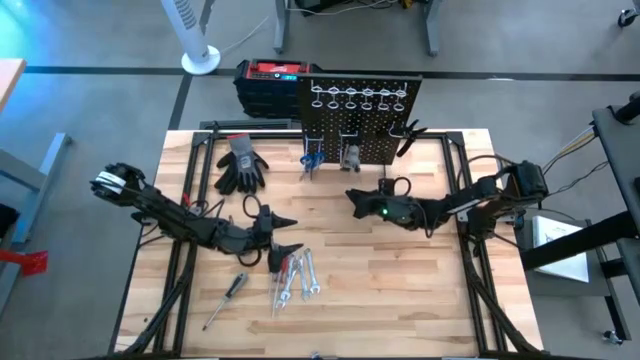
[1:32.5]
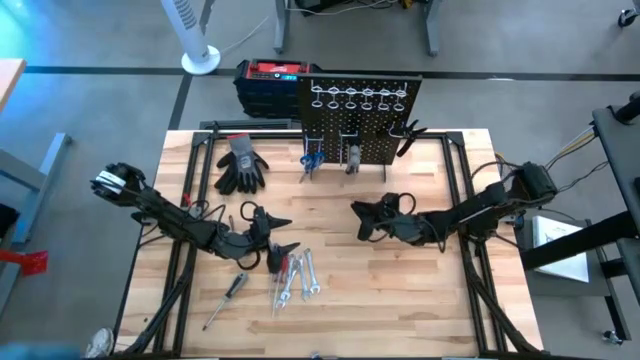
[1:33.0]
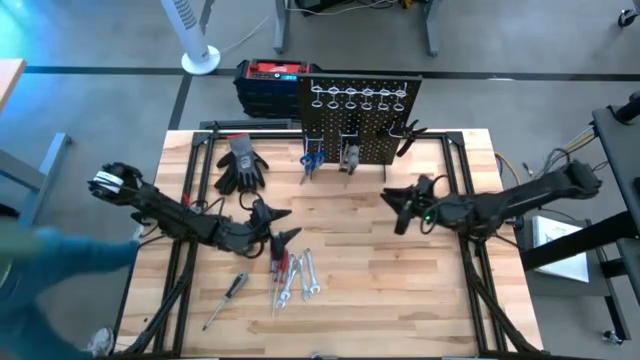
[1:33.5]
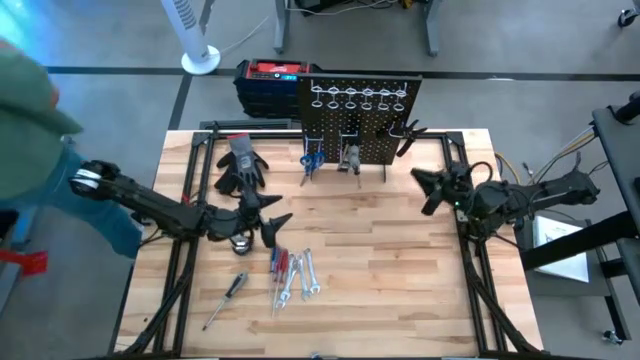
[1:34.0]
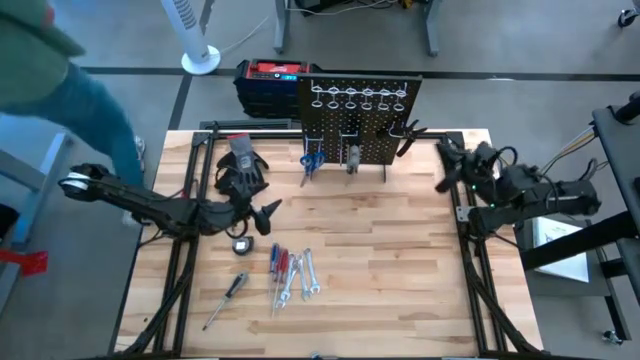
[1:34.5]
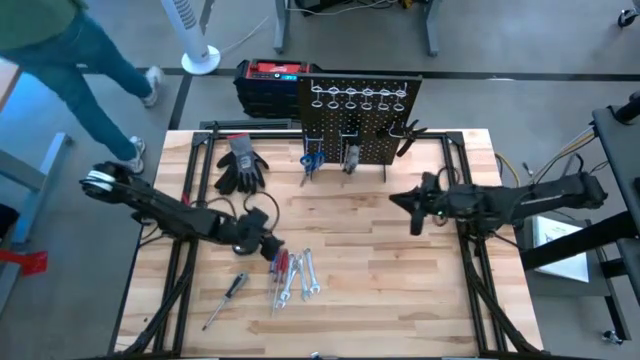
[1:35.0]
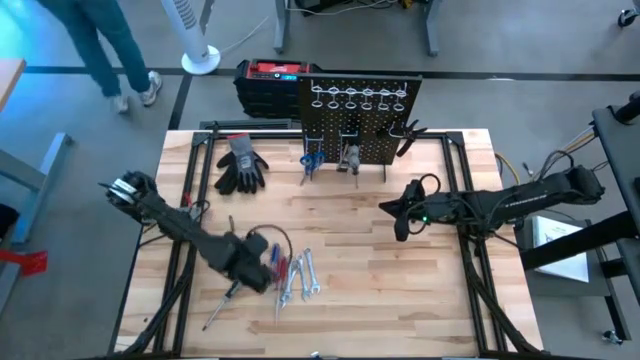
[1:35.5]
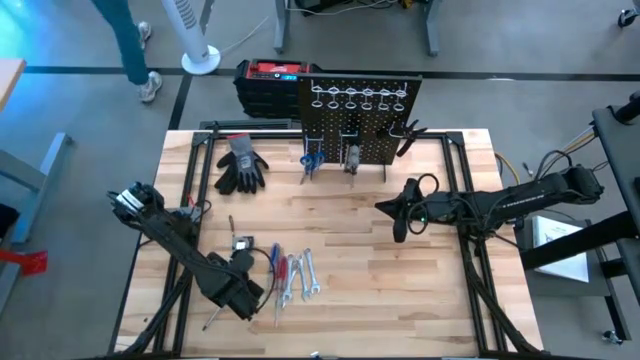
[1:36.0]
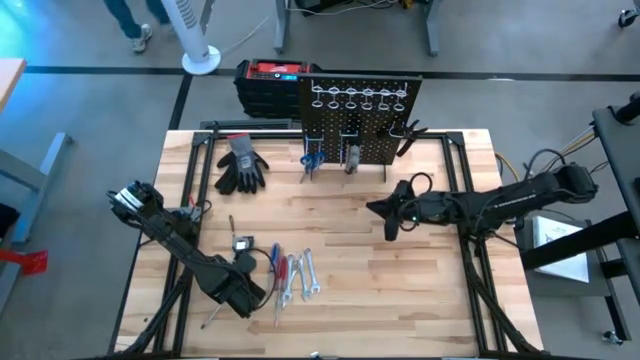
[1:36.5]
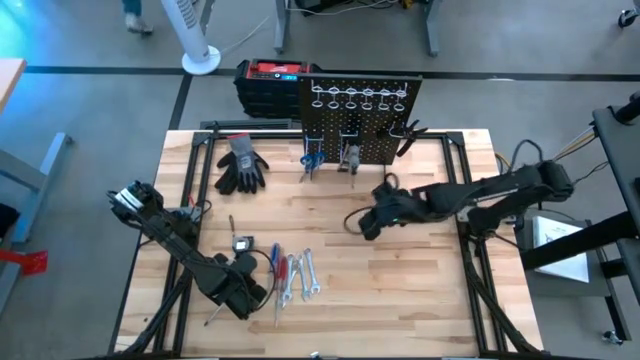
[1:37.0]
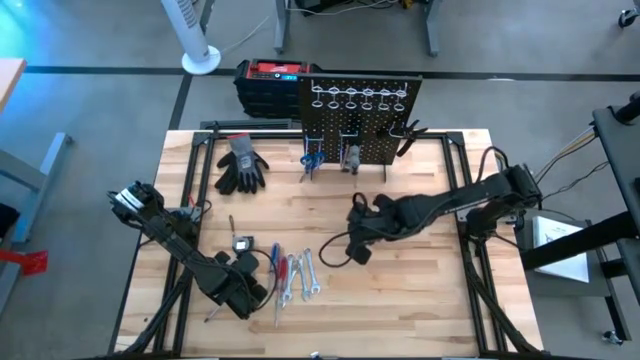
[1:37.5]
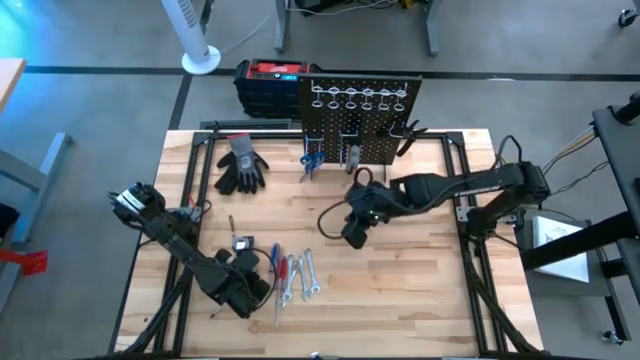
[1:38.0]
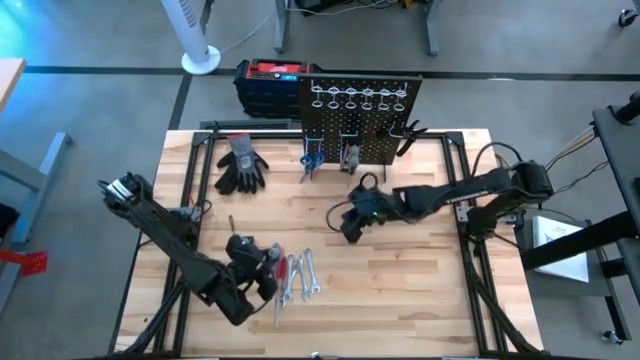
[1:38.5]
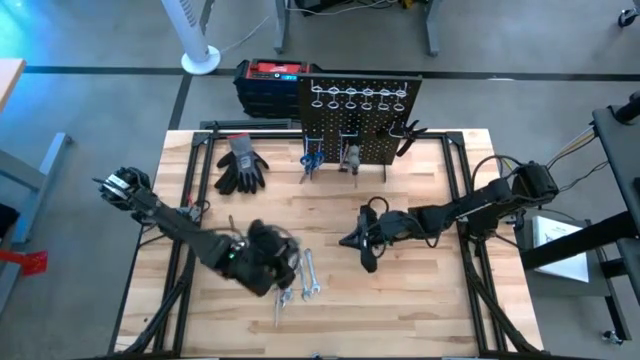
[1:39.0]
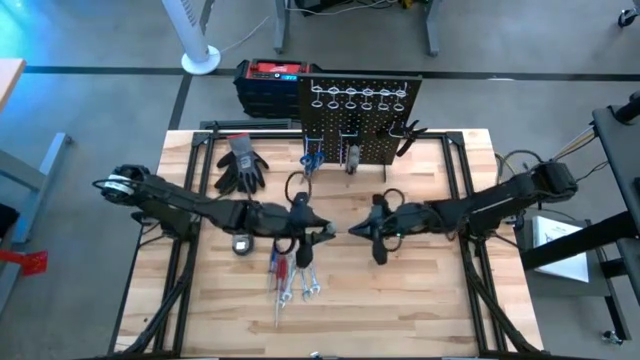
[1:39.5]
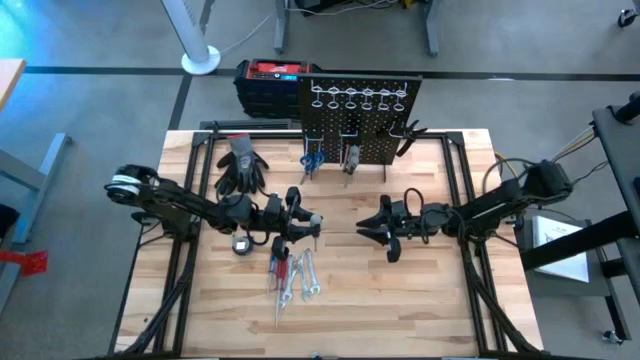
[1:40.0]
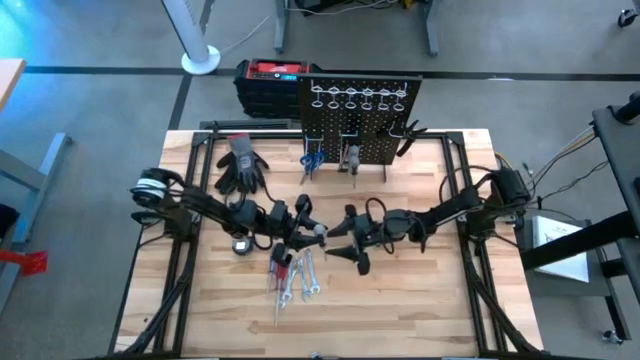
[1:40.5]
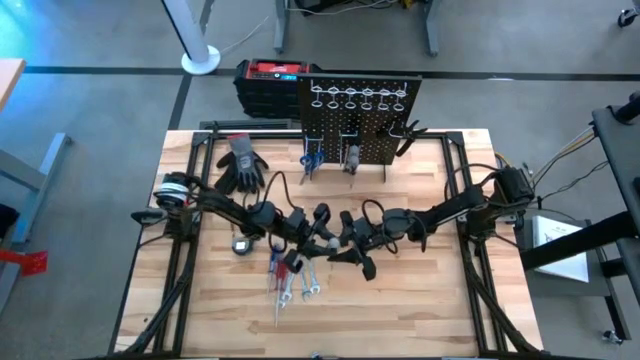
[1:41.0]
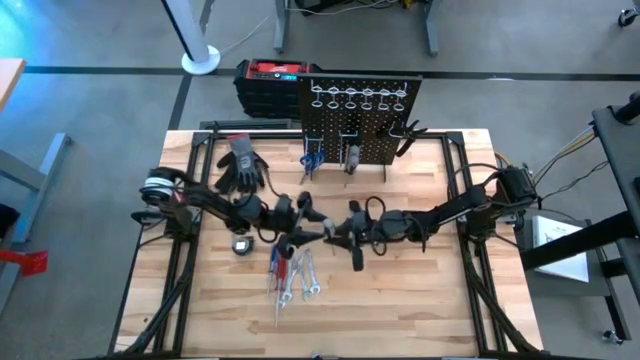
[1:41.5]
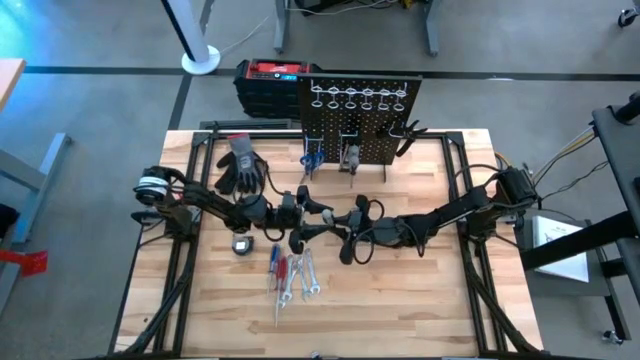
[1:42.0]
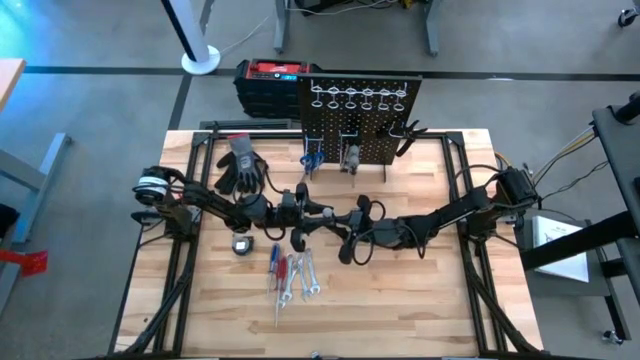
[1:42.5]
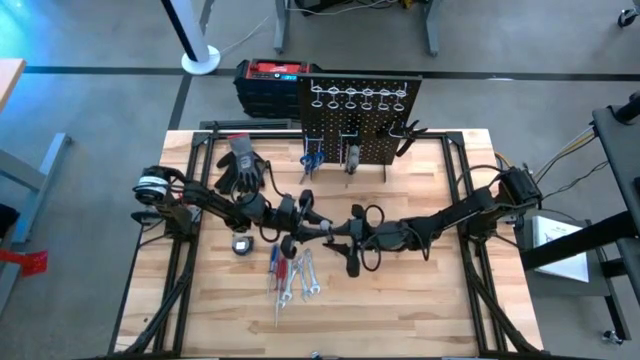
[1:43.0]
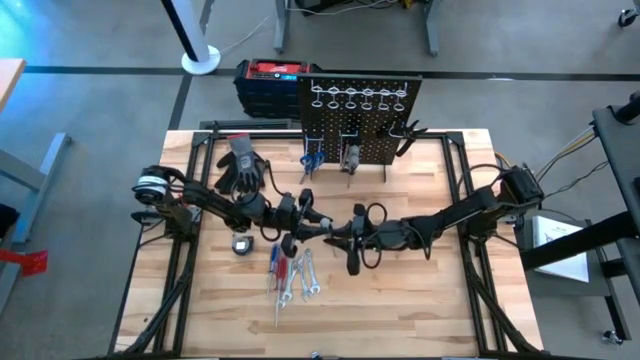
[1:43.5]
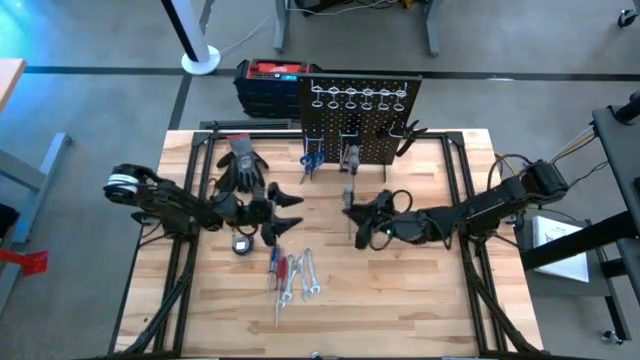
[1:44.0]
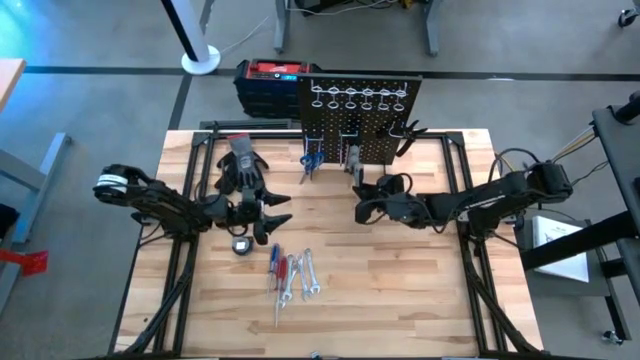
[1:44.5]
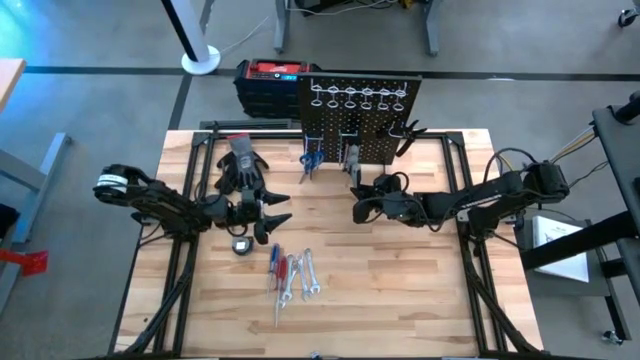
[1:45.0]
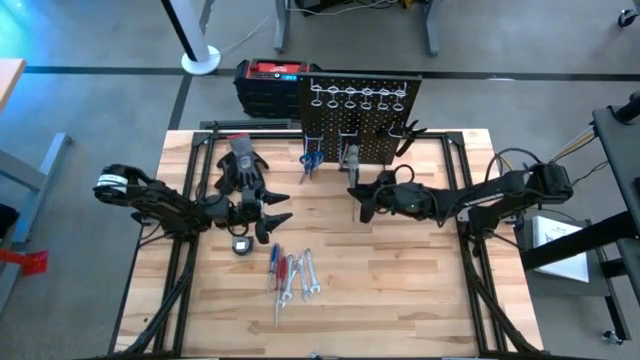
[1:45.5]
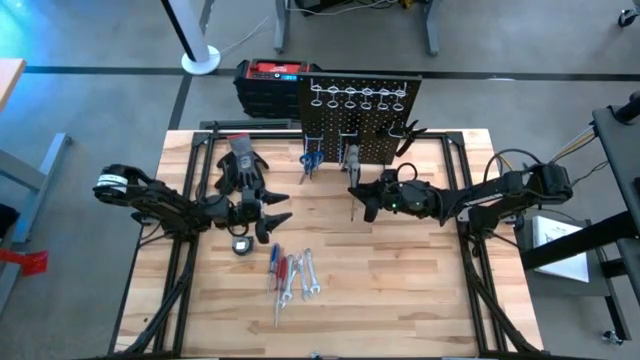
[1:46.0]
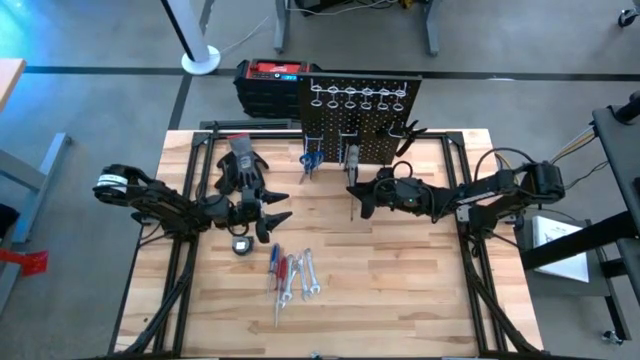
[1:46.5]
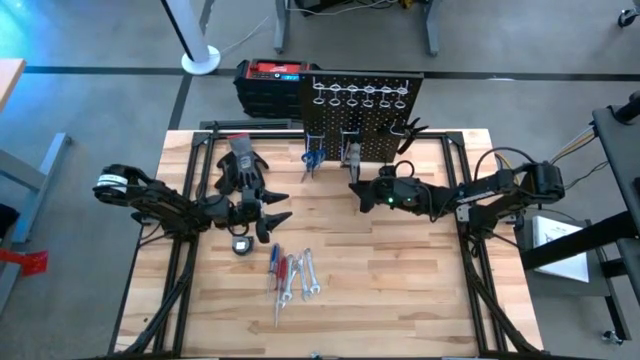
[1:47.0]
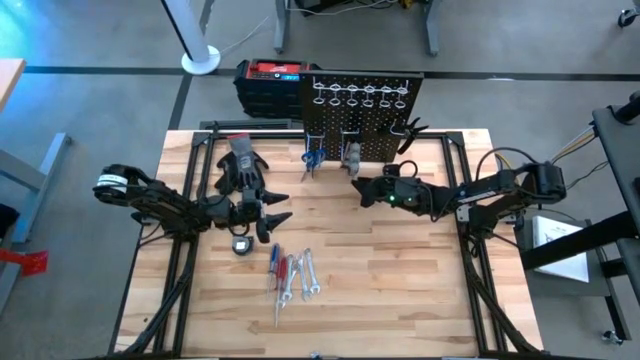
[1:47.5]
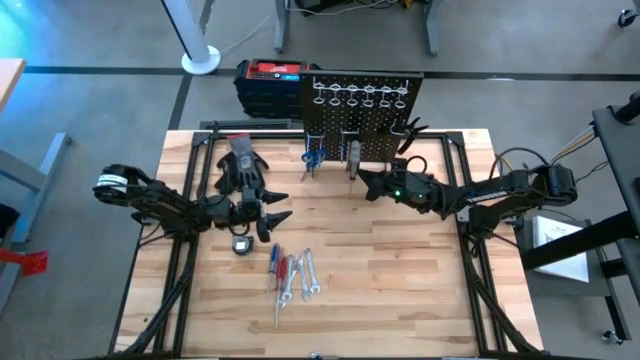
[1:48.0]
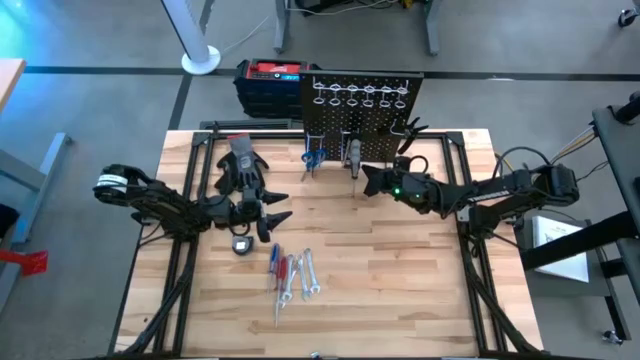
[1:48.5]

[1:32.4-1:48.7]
Task: Hang tools onto peg board
Hang the grey screwdriver on the pegboard

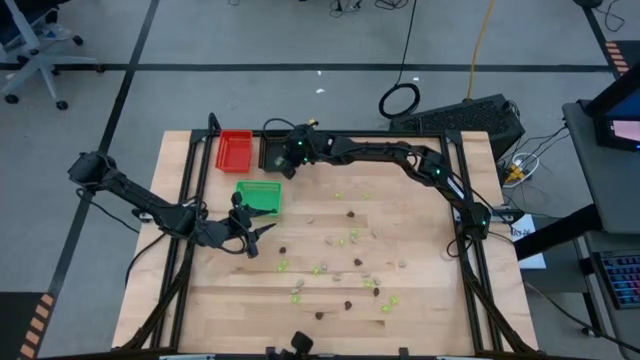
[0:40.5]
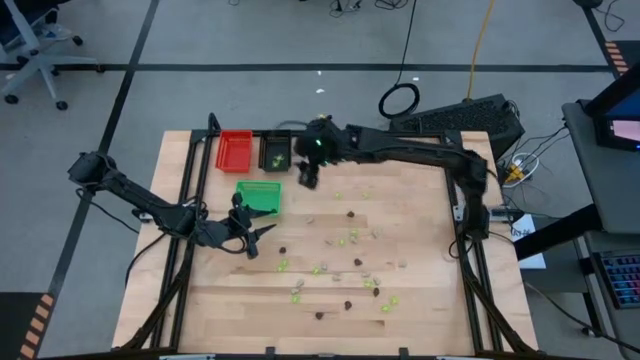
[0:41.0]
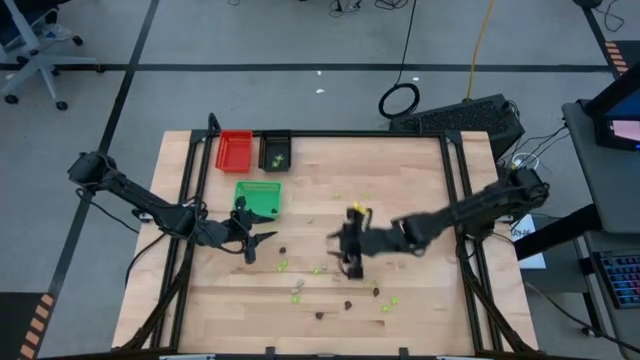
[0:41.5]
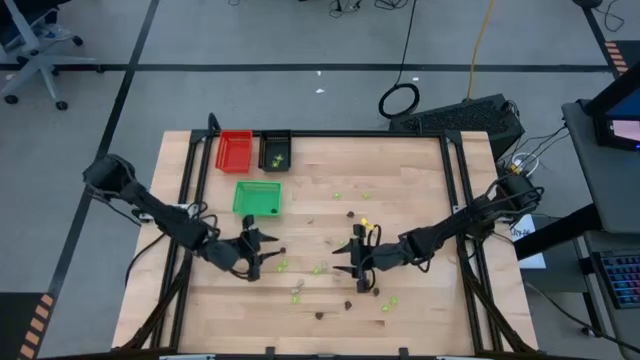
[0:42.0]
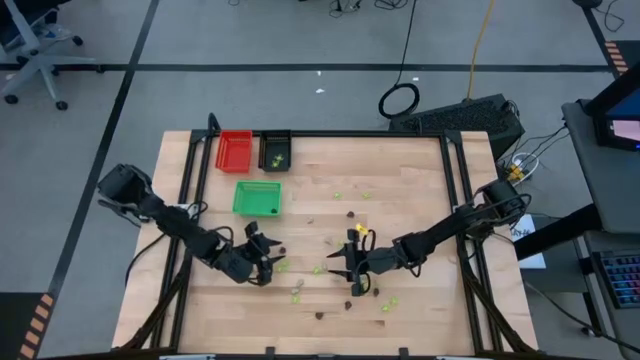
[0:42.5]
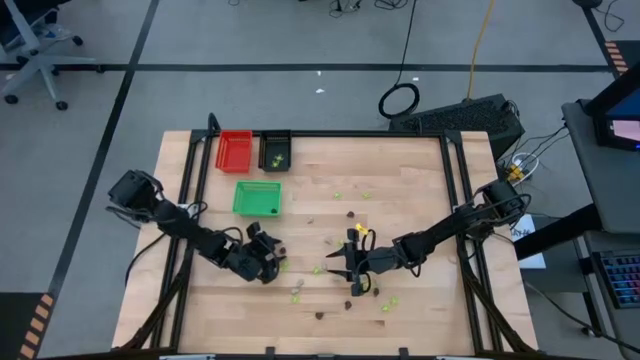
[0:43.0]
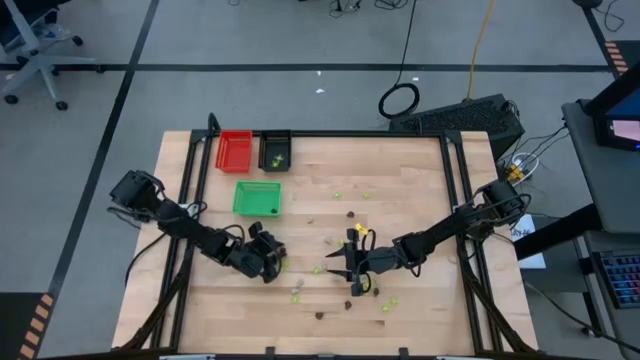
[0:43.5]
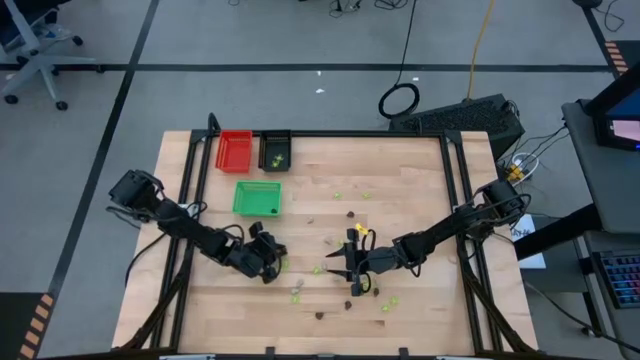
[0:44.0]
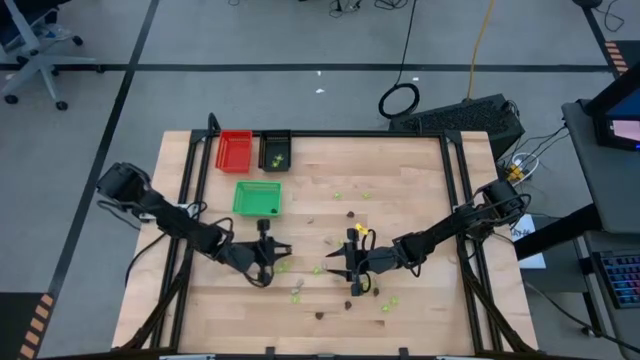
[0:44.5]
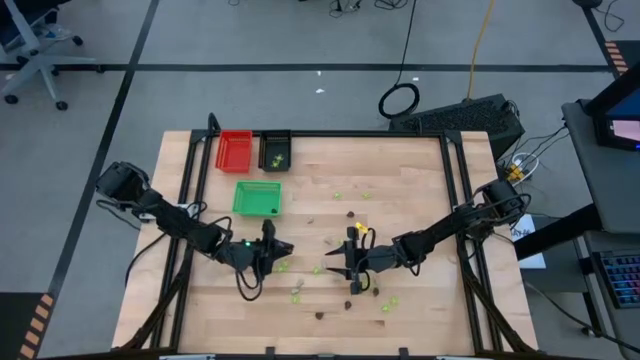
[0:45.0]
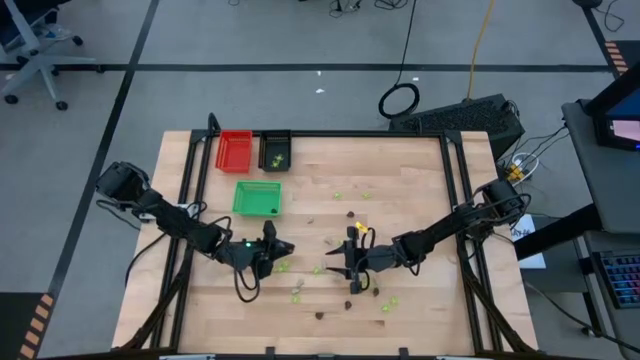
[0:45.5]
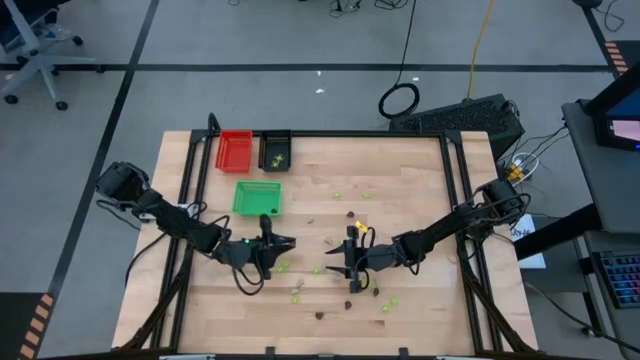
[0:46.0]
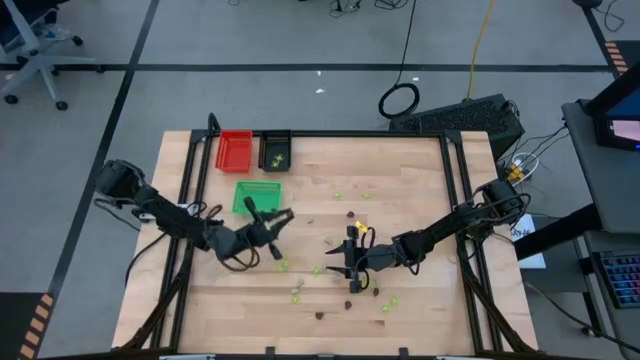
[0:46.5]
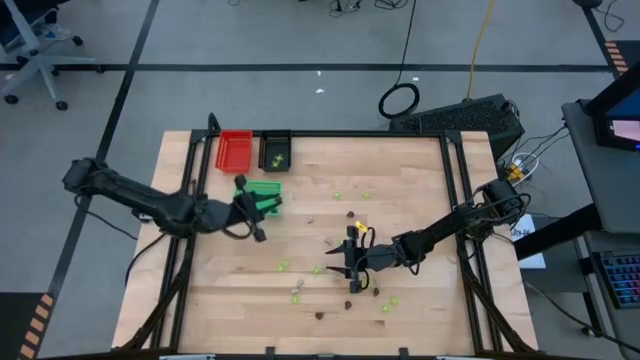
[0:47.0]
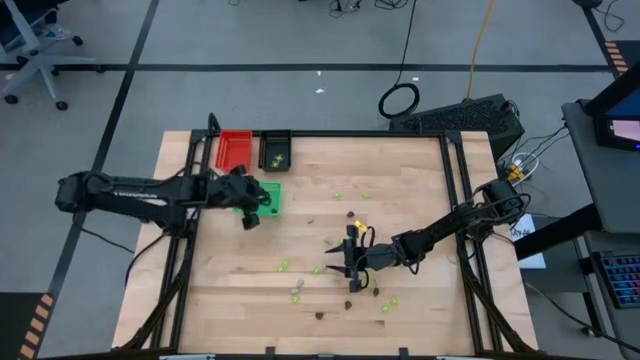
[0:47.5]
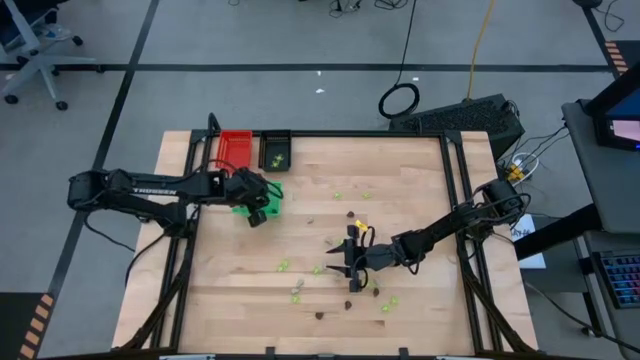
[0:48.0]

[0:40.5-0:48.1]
Task: Sort Halloween decoration
Put the black skull toy into the green bin
